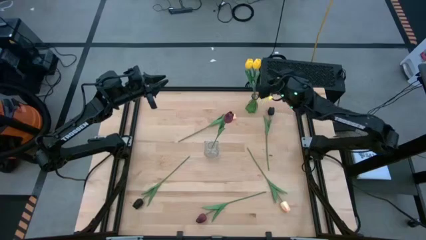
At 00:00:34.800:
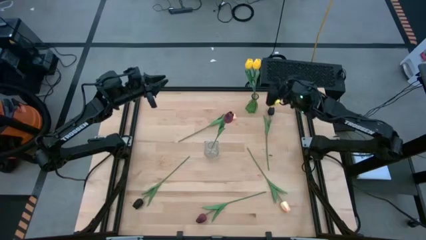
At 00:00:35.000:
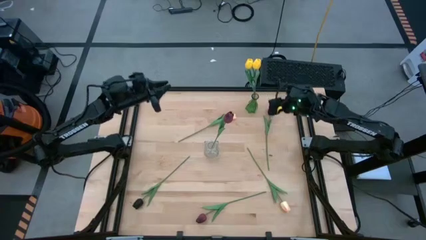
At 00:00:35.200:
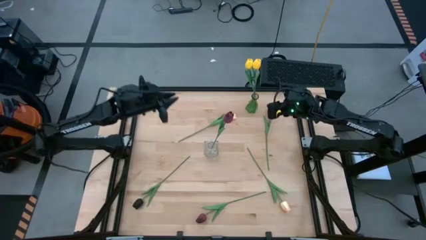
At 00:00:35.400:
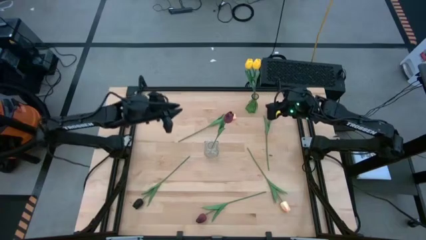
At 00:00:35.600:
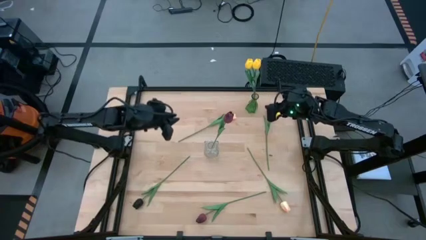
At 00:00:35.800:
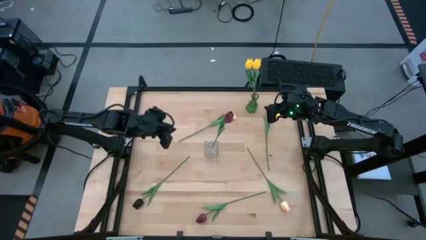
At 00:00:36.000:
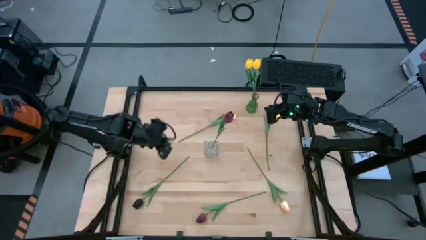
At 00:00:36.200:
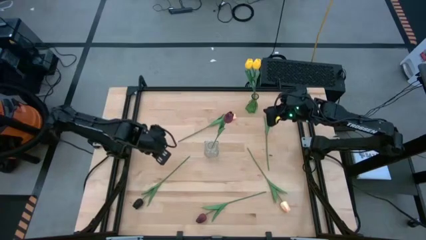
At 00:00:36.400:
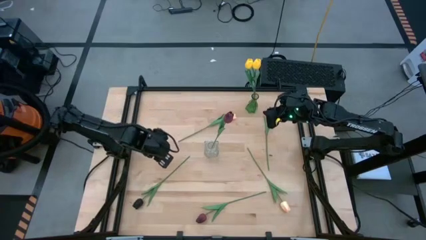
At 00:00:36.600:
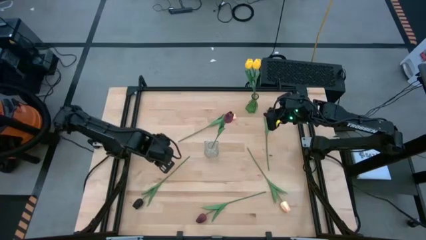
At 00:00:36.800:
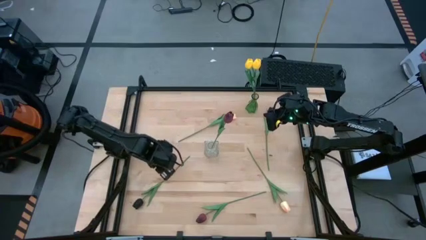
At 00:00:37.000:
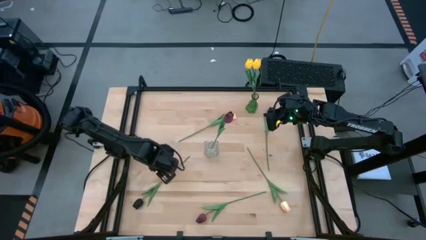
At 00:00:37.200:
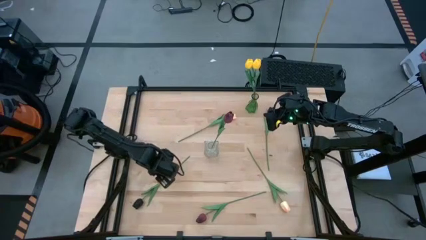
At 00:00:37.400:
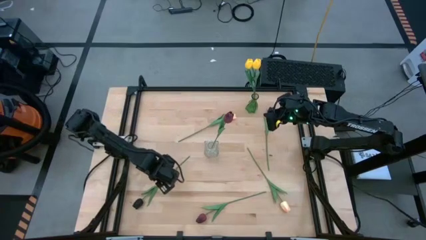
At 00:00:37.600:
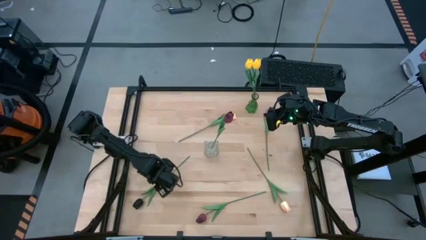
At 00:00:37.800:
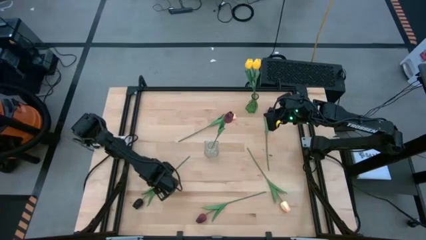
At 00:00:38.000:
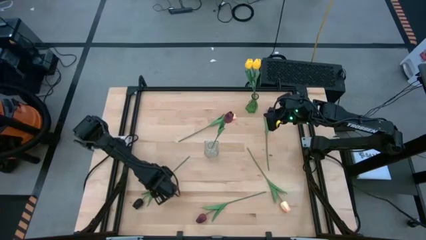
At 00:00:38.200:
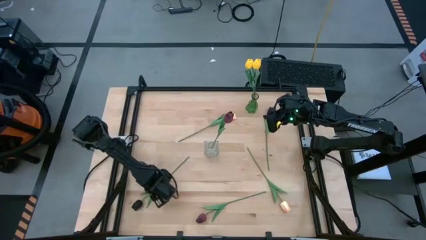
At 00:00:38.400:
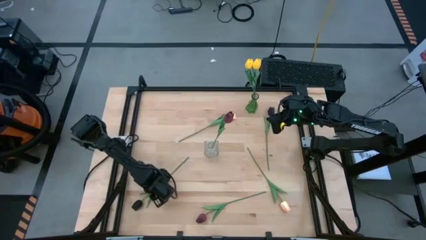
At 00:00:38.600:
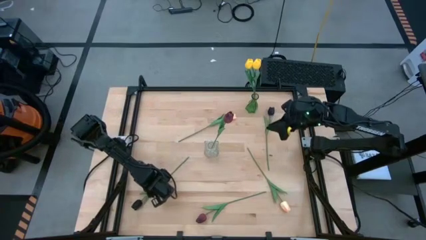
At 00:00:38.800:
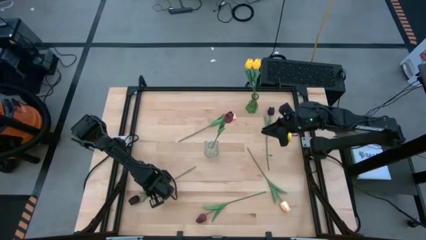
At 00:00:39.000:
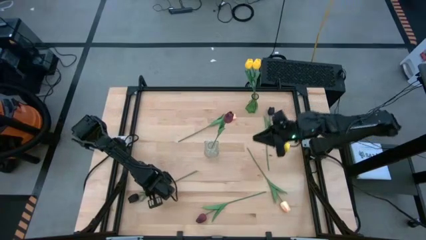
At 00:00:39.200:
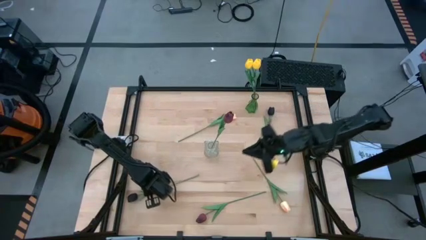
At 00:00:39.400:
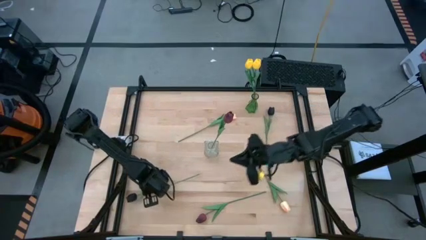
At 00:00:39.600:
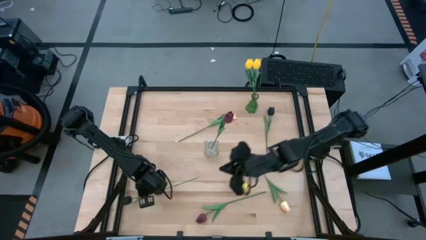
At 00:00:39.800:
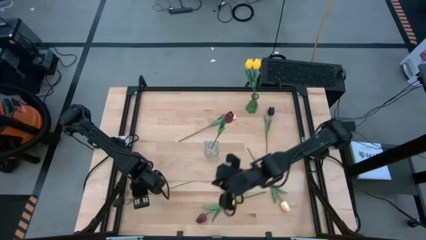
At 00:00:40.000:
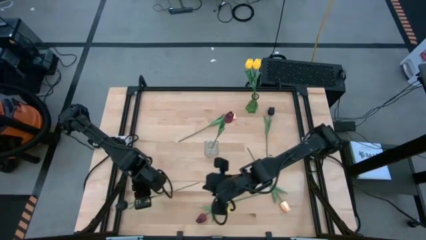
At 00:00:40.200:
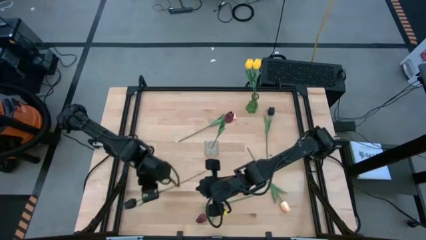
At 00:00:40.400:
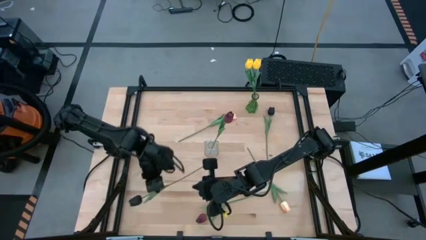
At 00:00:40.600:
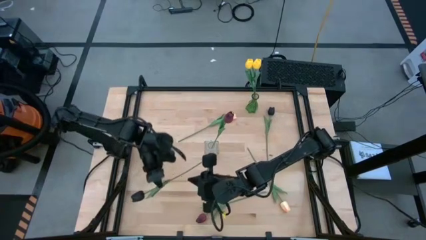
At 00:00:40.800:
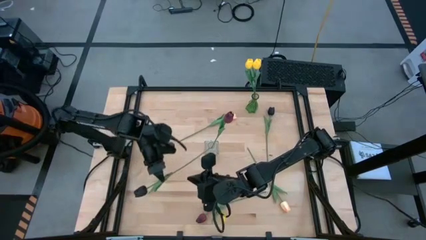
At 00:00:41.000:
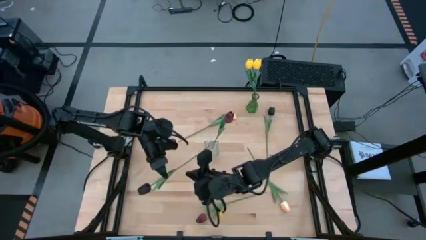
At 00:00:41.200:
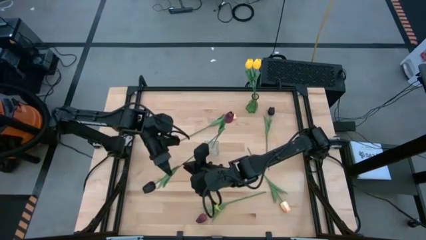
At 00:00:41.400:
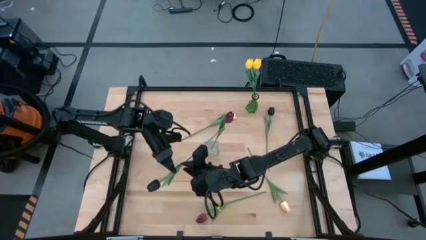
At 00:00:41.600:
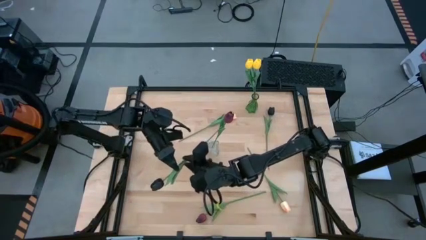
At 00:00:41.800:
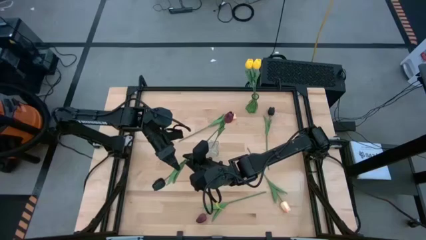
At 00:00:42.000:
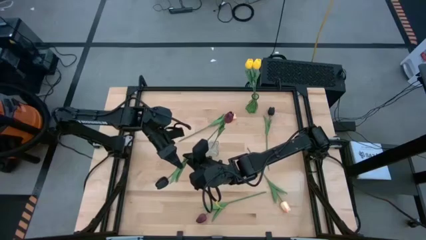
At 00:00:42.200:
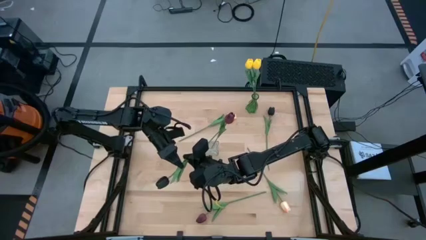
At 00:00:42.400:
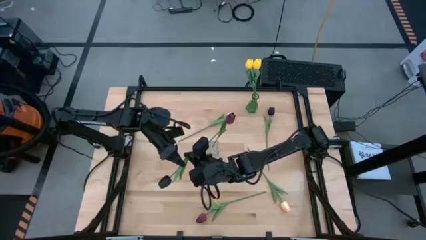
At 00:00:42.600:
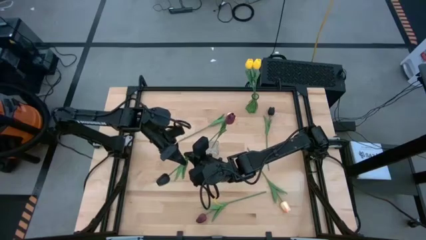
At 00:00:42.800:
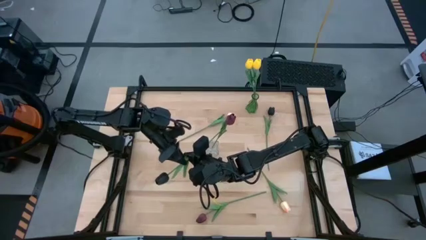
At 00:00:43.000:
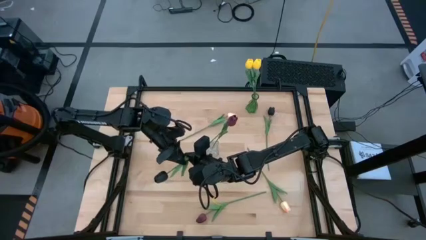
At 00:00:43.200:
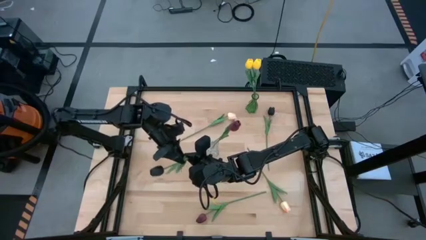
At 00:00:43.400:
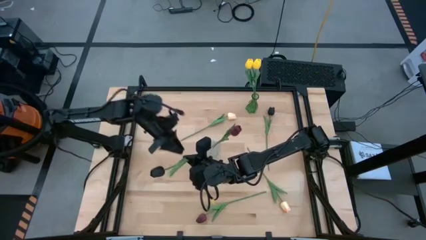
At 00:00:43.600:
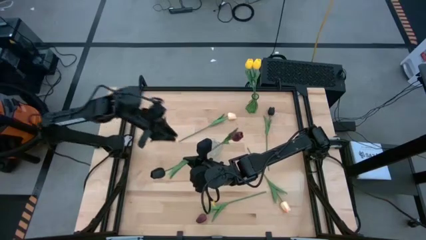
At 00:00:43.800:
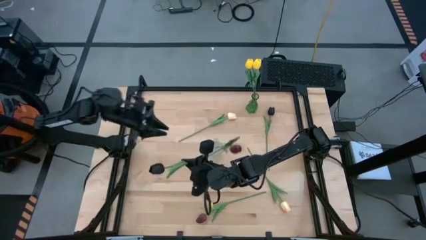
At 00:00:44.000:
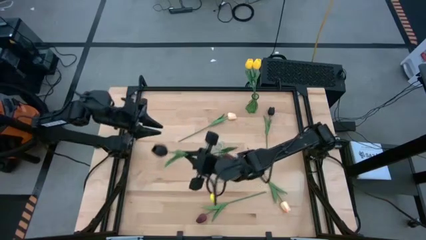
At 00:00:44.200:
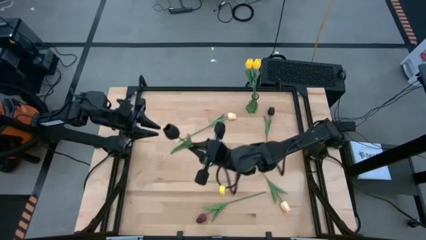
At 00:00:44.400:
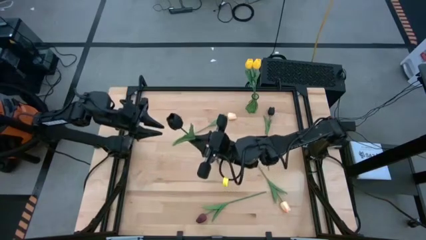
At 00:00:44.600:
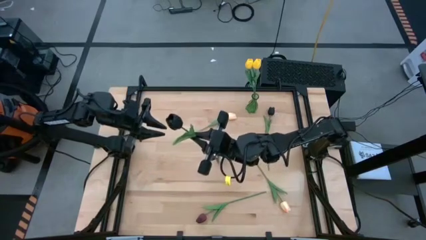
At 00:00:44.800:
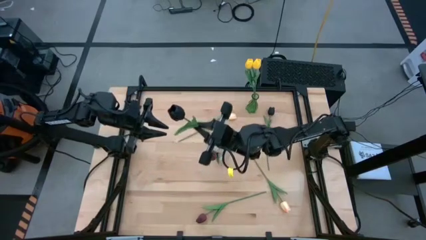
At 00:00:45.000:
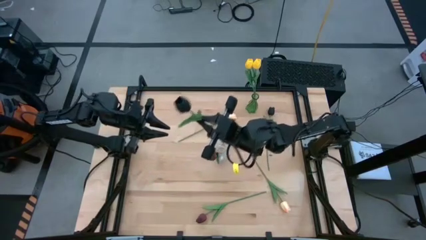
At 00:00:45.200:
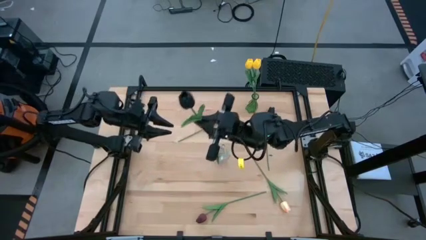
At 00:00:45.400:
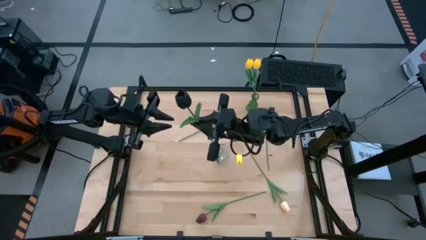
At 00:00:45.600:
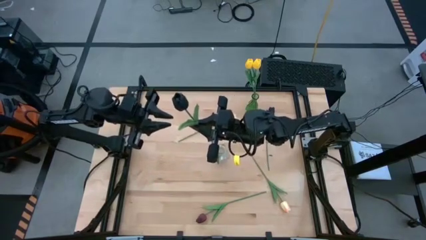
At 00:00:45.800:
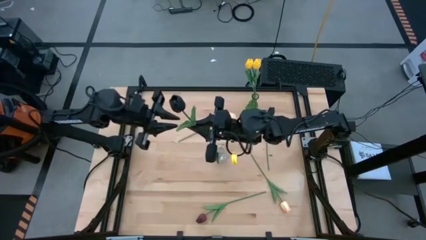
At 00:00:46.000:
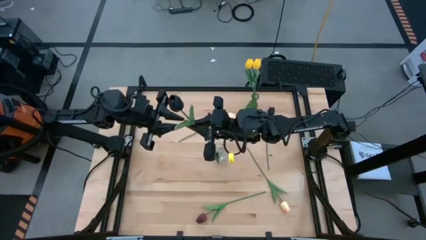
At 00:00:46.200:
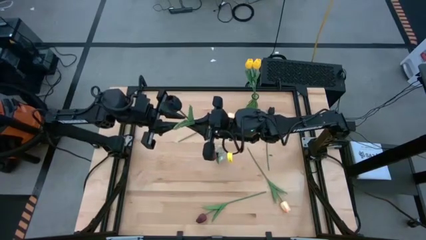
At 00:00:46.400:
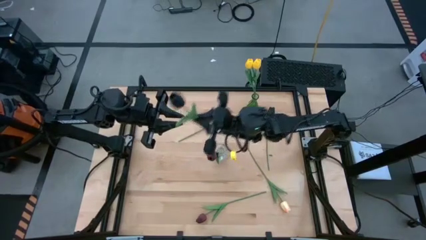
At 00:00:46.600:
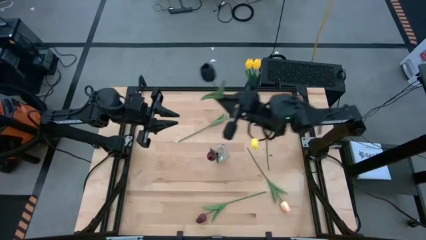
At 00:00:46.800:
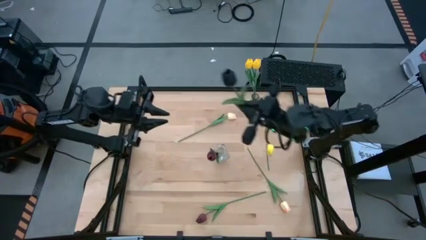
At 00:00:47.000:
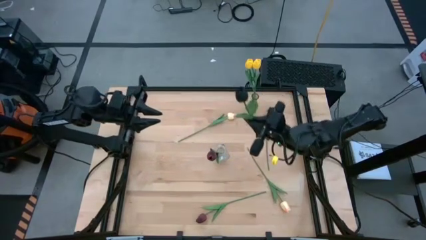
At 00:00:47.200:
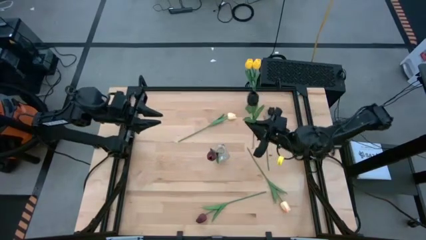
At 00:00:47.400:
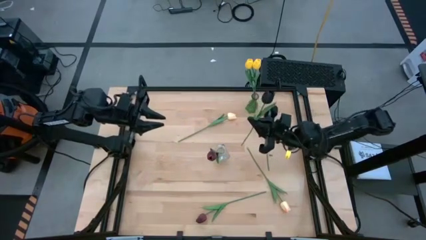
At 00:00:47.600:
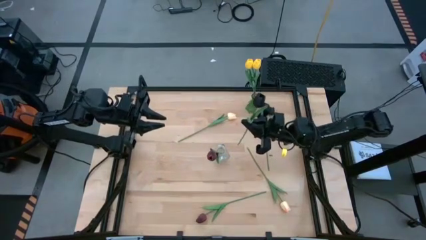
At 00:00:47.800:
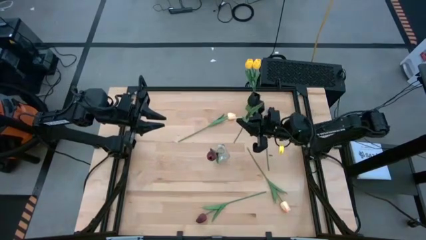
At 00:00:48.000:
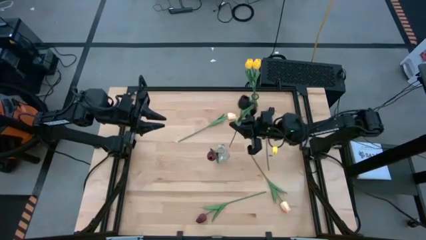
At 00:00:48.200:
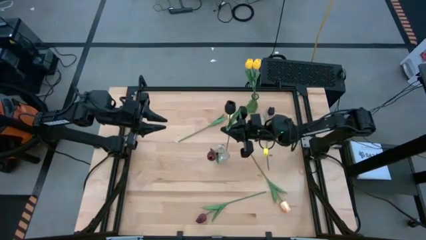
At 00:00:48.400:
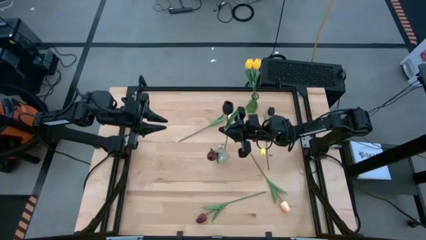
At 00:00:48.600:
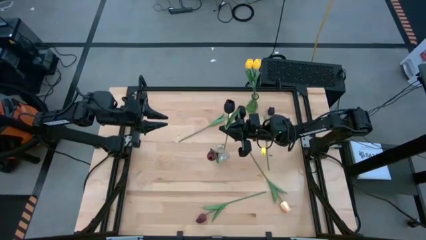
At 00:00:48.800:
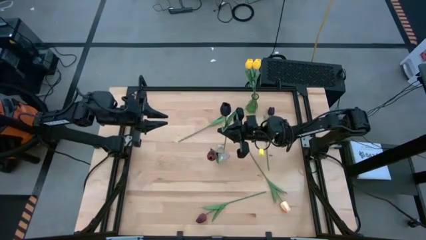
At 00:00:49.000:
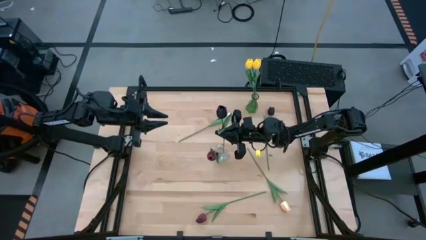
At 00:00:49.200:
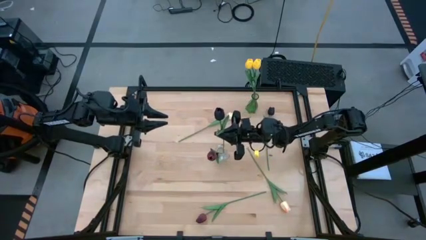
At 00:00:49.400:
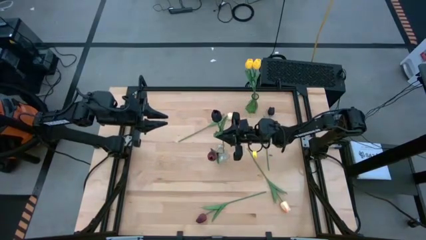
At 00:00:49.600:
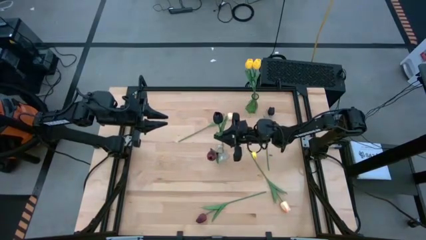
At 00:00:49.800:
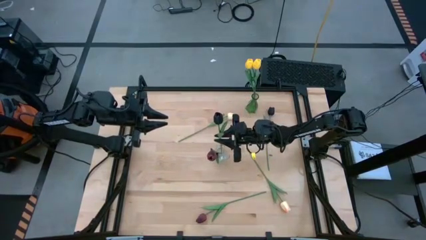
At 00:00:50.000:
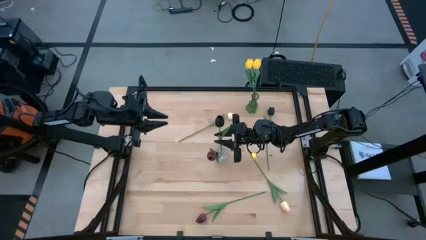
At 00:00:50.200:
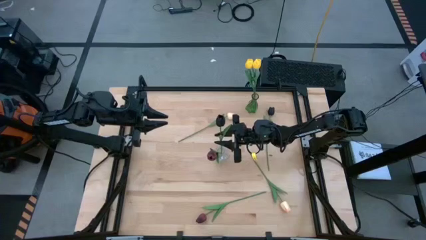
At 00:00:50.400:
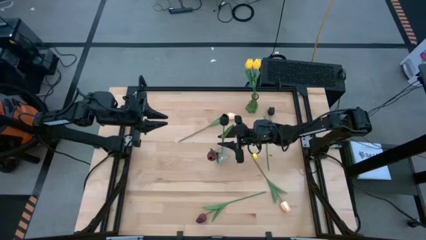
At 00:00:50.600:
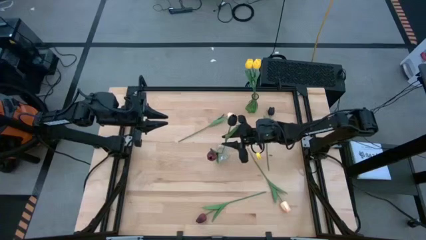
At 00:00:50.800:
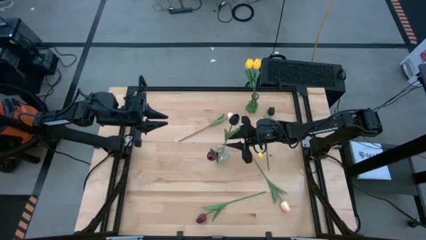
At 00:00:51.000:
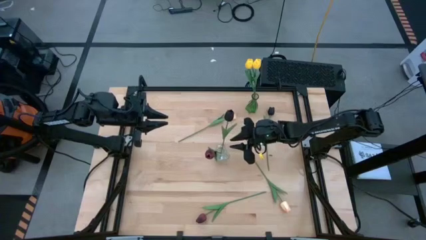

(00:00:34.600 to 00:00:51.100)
Task: Sort flowers into vase by color
Put the bottom black tulip into the transparent vase
